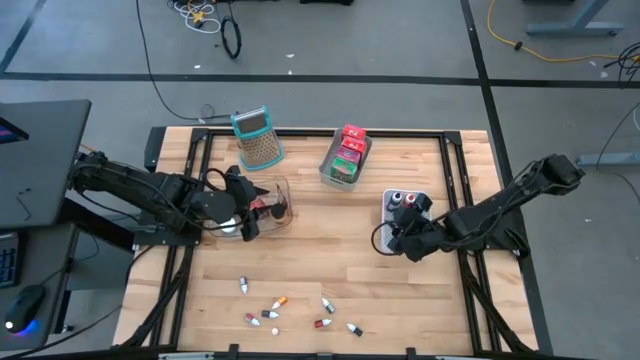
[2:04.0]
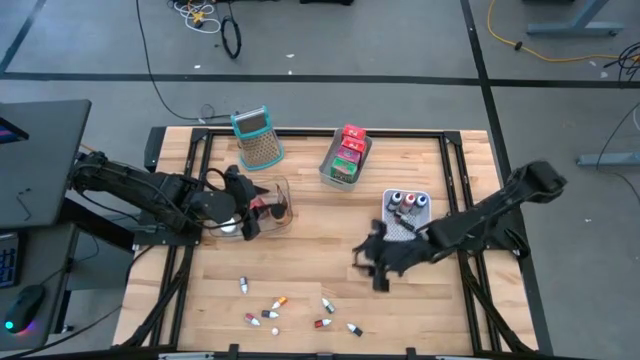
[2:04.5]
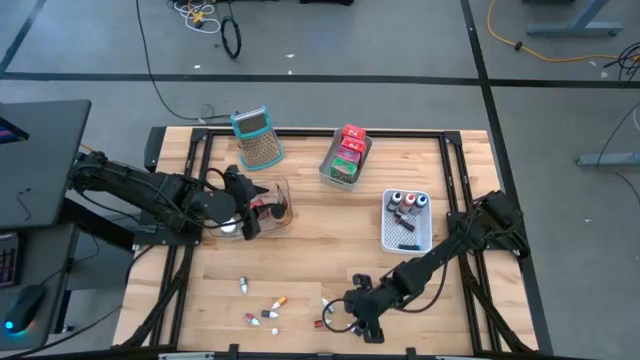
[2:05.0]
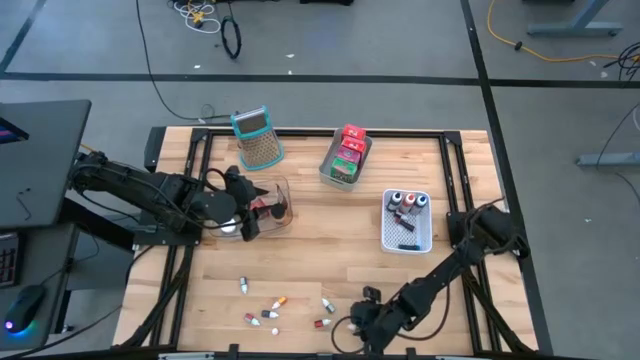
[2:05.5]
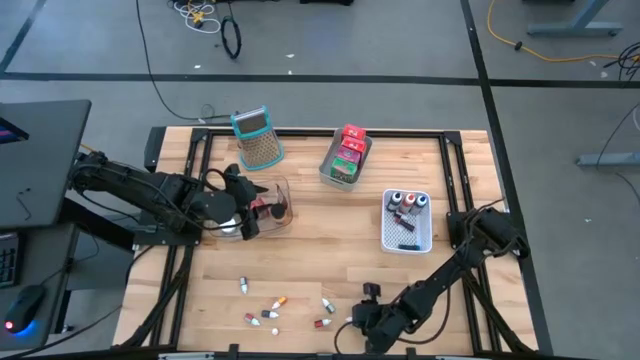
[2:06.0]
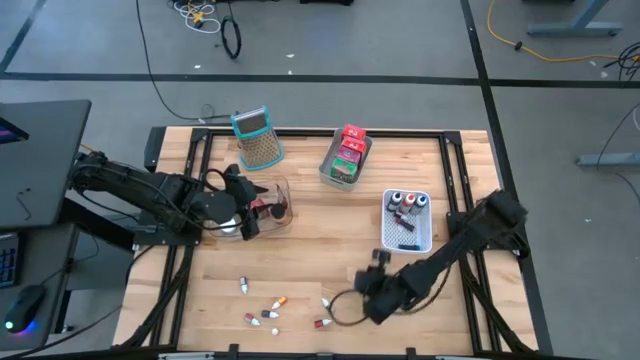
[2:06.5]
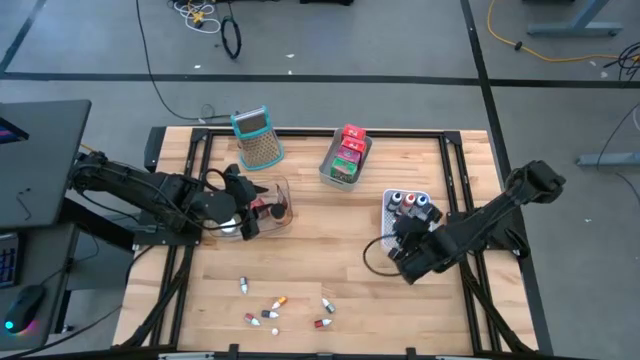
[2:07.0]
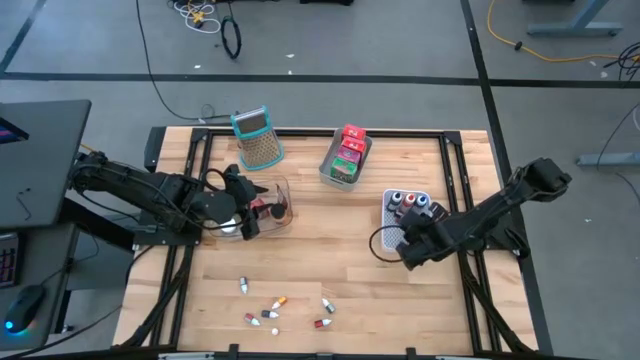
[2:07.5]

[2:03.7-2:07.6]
Task: Pick & Place Kitchen Items
Put the black food coloring bottle into the white bin

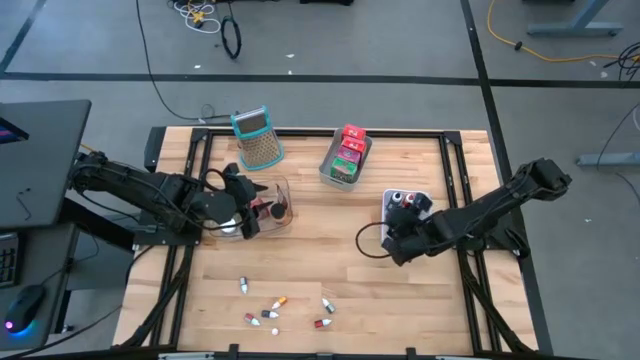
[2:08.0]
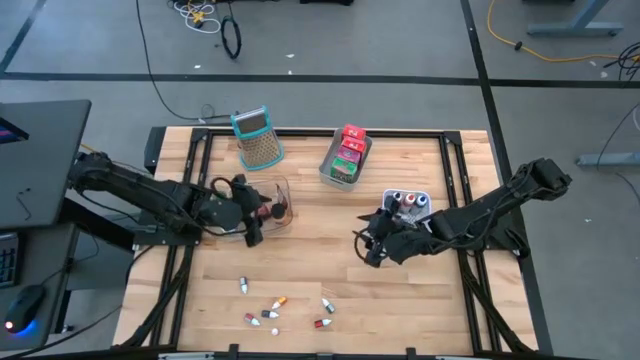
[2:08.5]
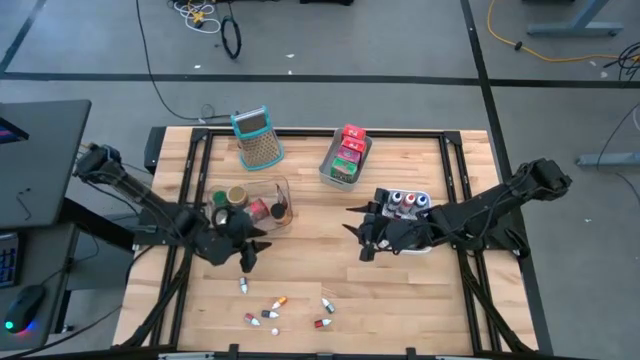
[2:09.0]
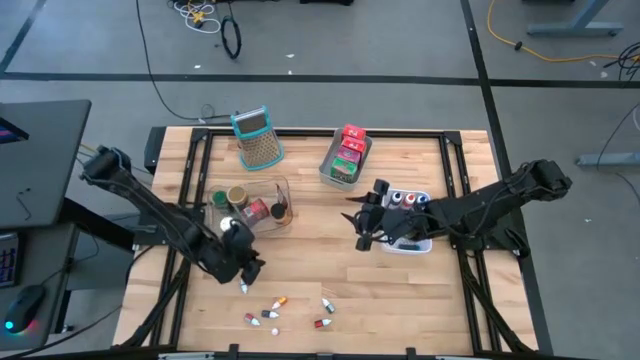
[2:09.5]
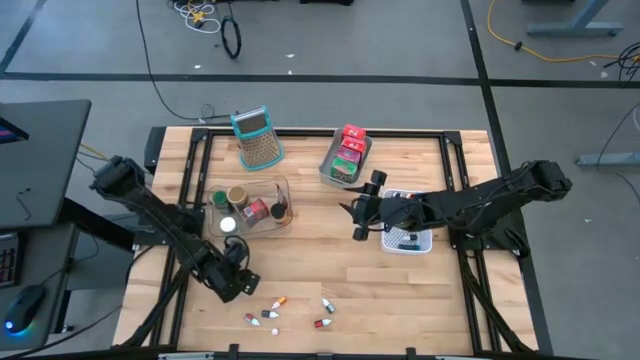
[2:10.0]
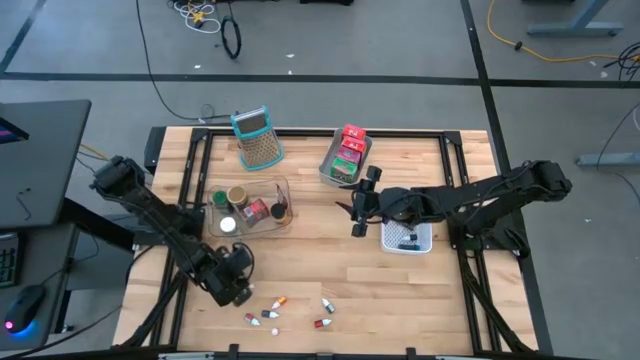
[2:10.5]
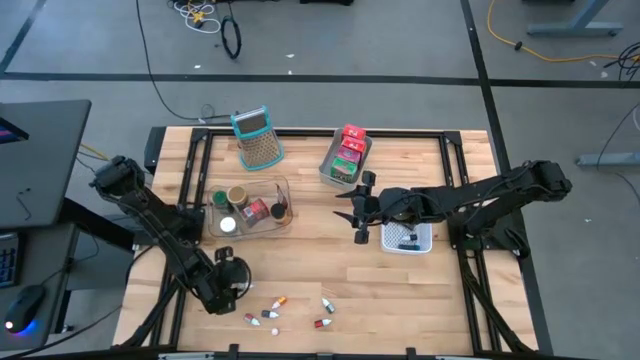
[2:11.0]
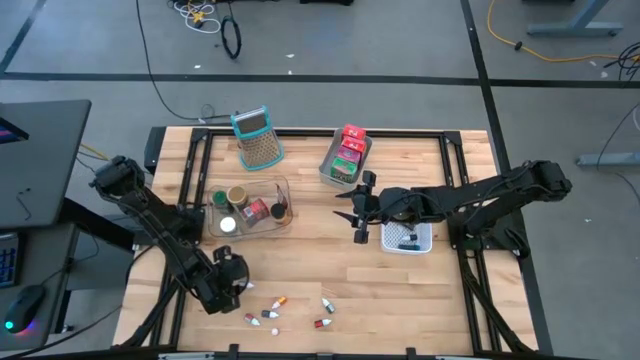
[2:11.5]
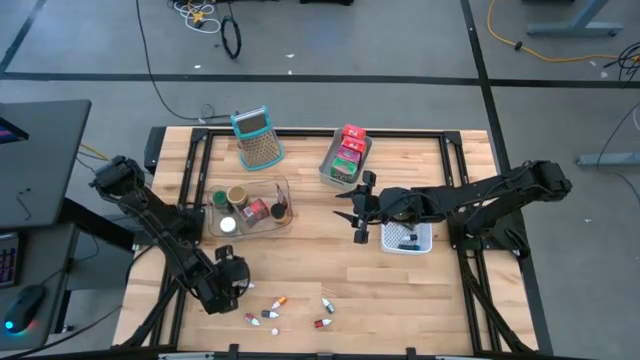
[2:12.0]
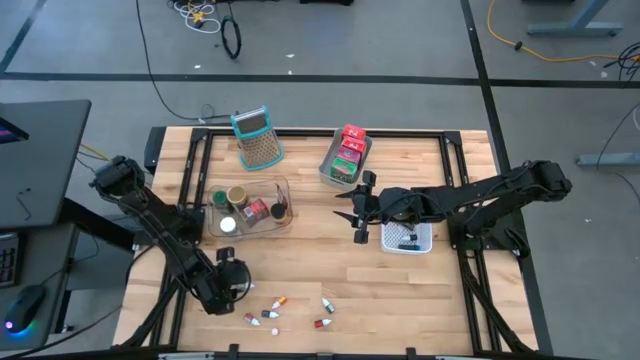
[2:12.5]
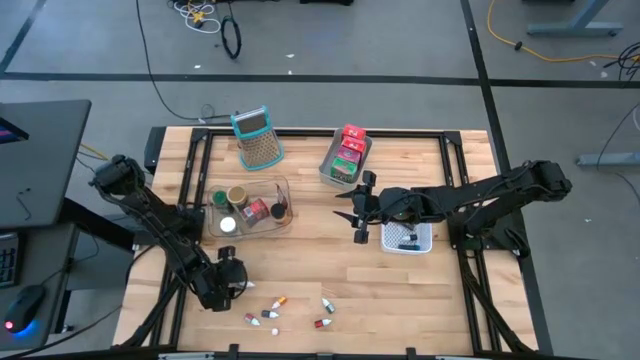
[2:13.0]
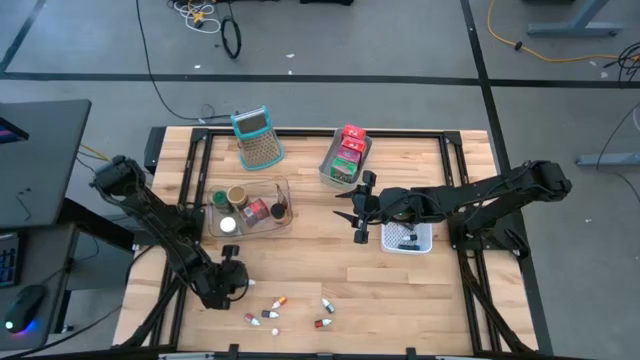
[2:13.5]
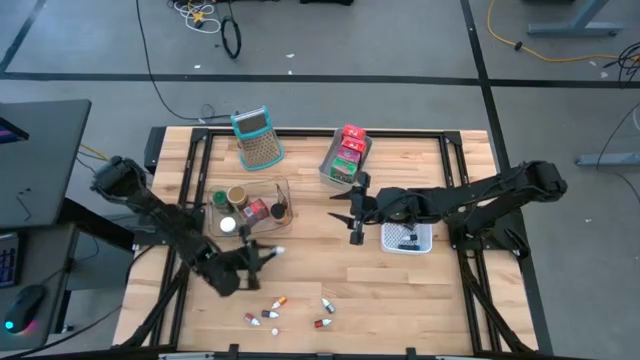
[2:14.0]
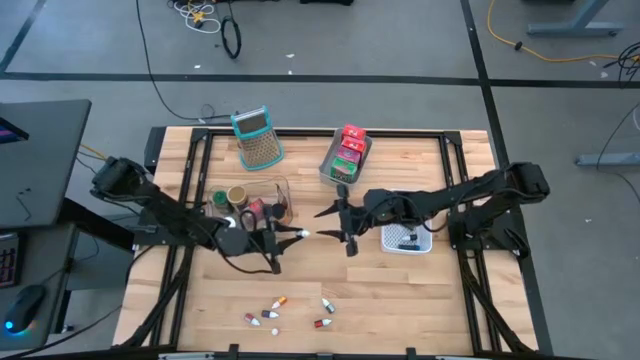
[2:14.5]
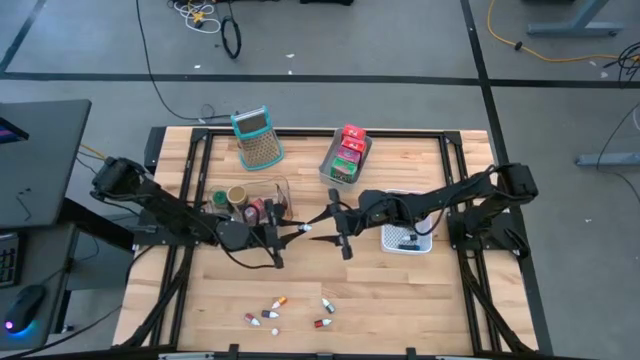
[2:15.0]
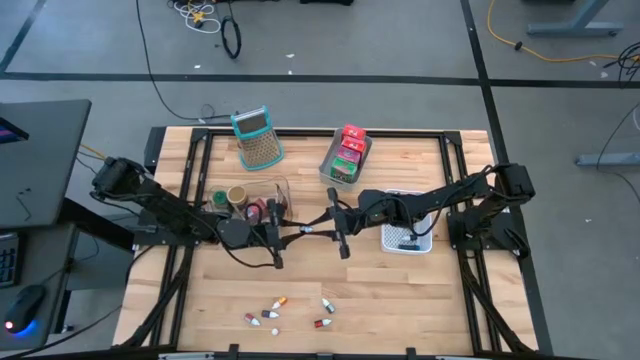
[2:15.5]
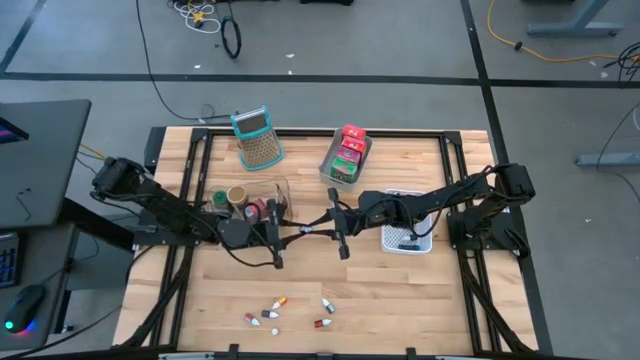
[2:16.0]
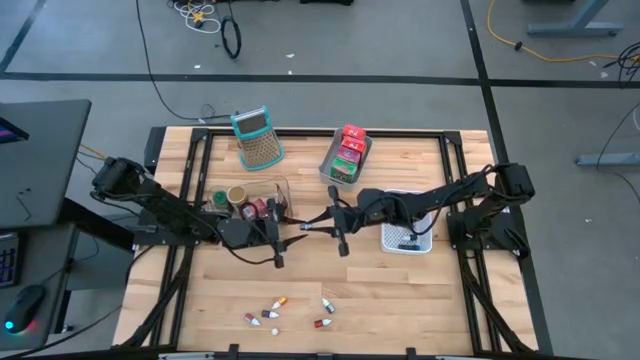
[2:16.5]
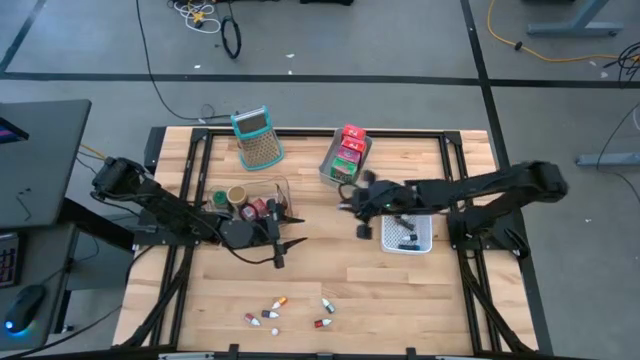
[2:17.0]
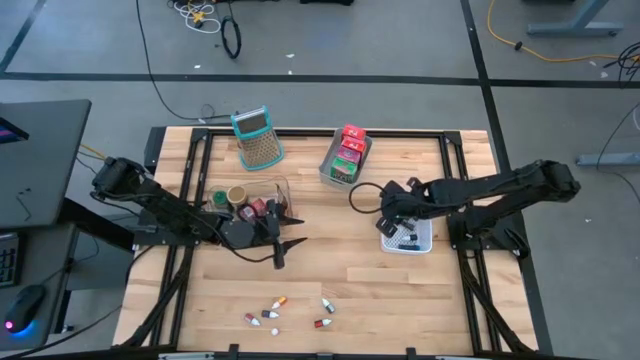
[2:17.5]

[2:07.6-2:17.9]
Put the purple food coloring bottle into the white bin

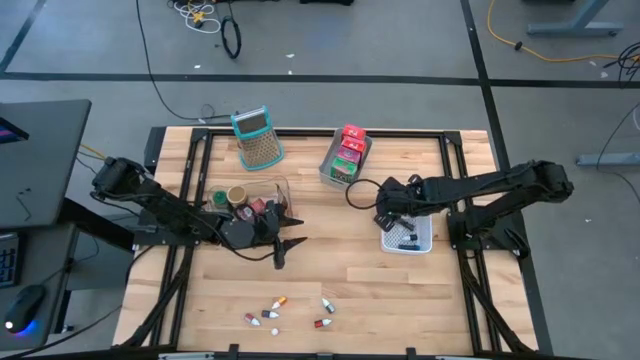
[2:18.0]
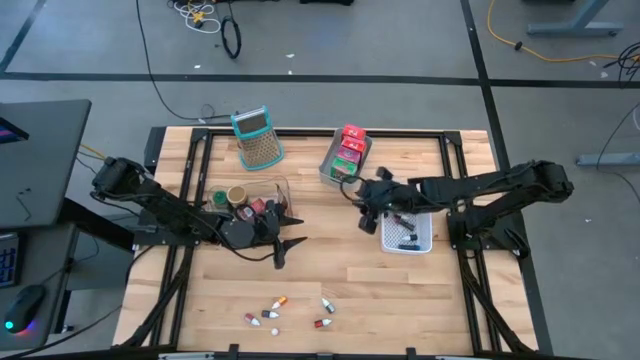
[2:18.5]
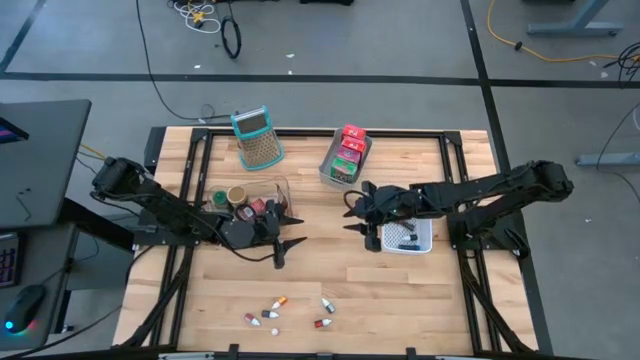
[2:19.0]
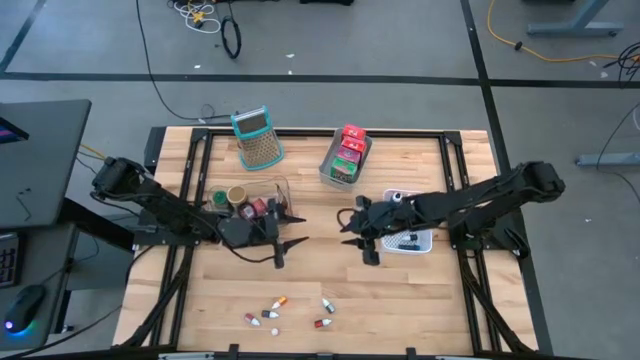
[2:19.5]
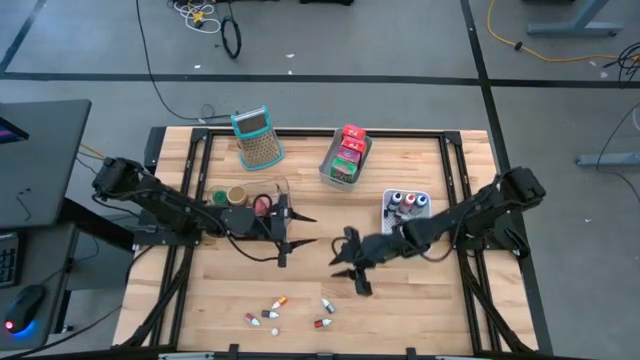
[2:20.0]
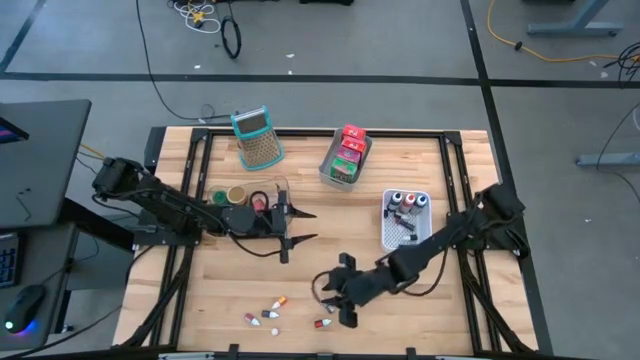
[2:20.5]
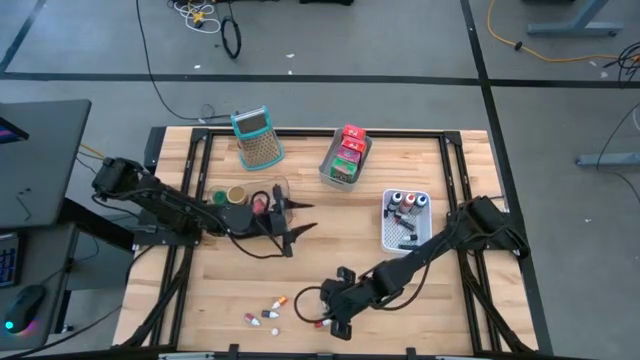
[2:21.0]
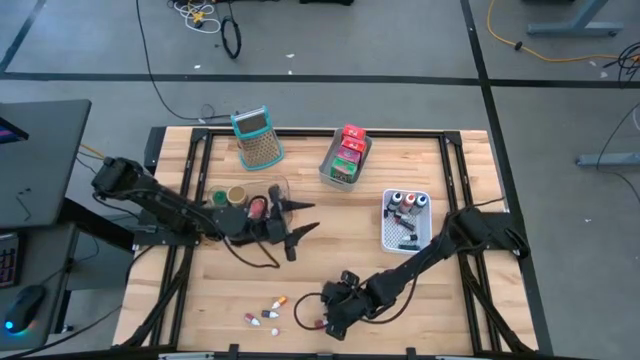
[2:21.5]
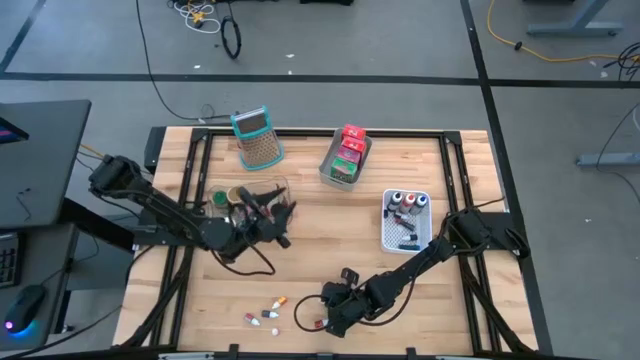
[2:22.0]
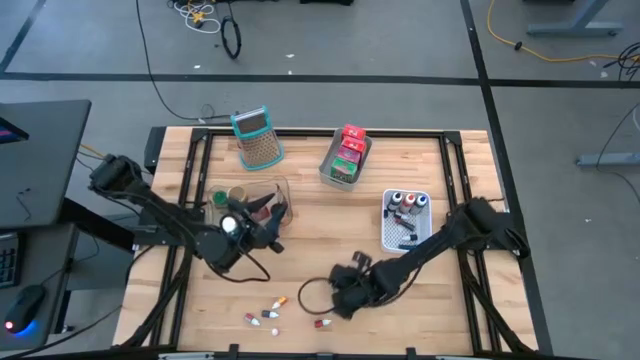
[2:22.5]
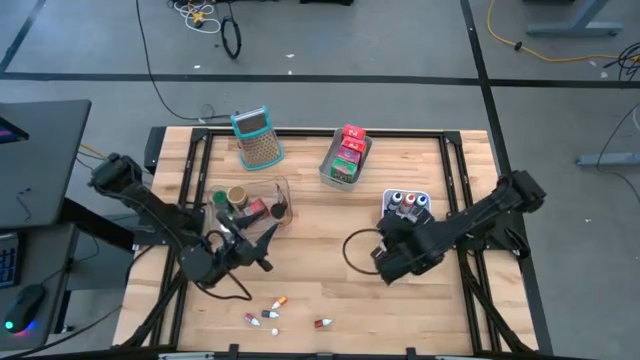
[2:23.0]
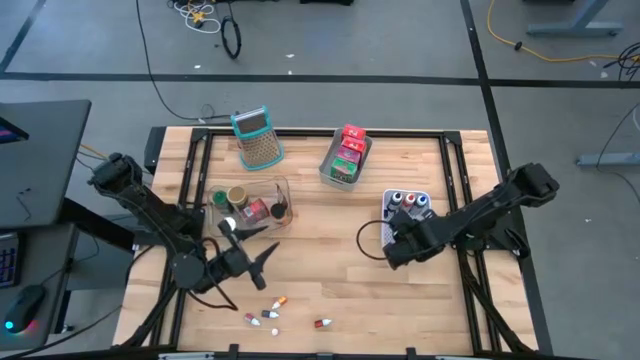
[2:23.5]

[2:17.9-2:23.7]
Put the green food coloring bottle into the white bin

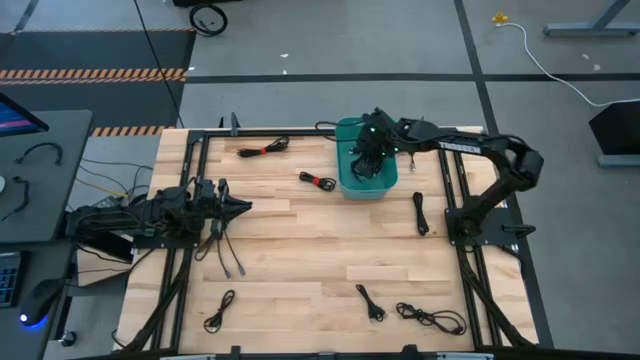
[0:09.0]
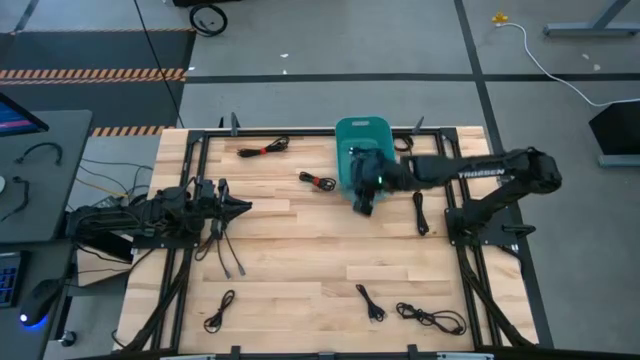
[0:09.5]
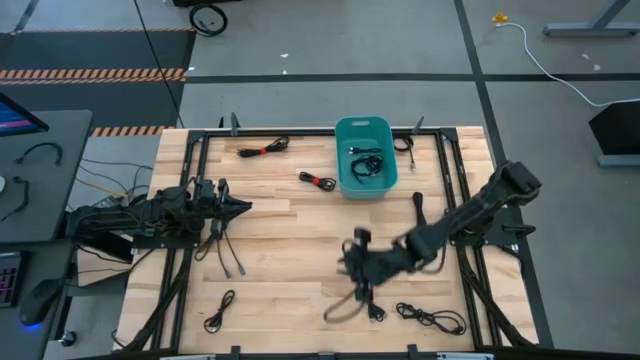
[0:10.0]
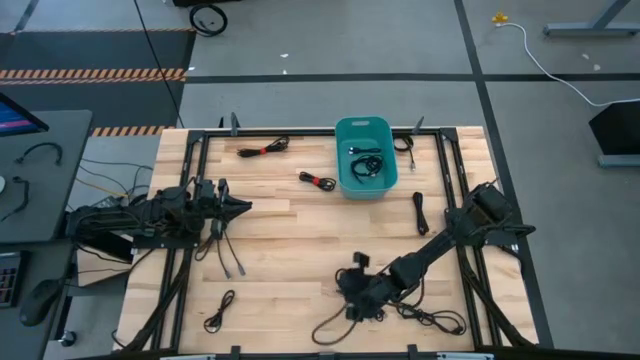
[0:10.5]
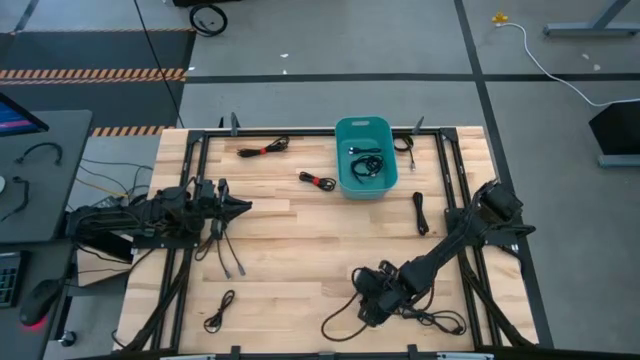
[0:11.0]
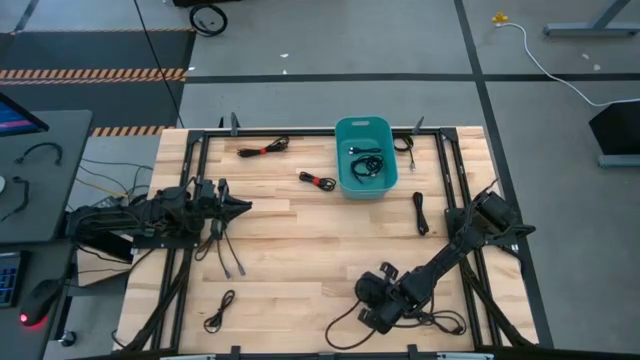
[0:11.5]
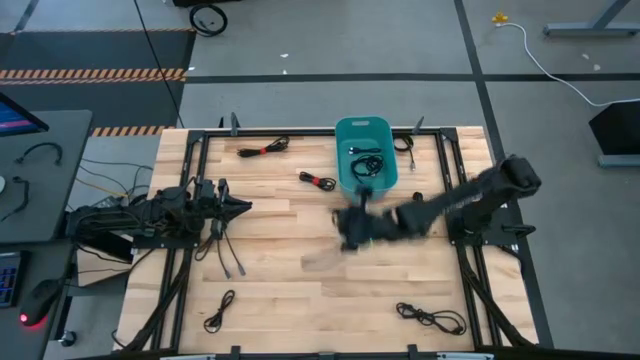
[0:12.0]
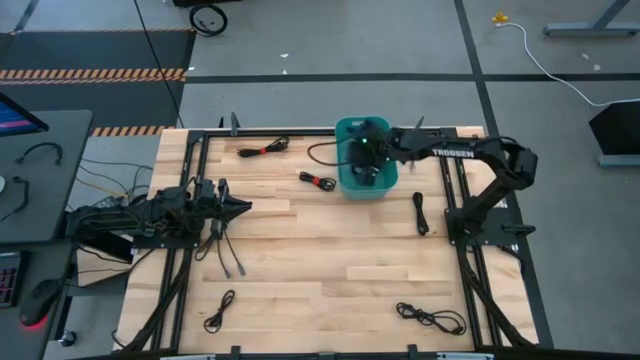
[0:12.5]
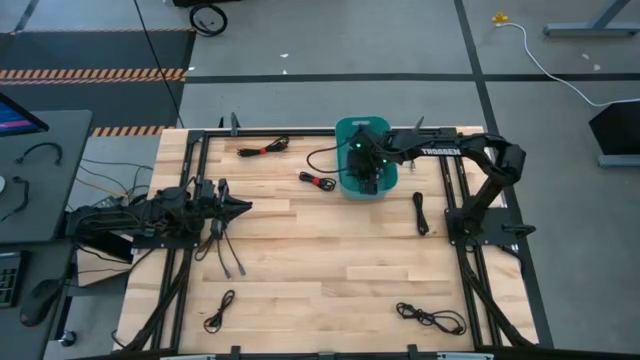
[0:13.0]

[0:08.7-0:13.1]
Task: Pick and place USB-C Cables
Put the black charger cable into the green bin
